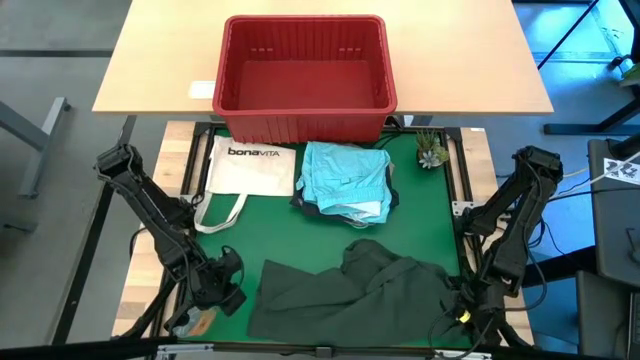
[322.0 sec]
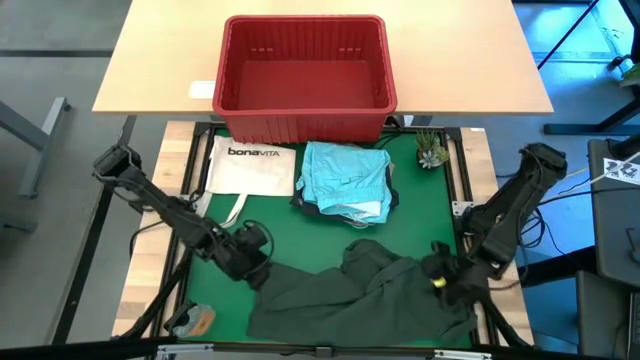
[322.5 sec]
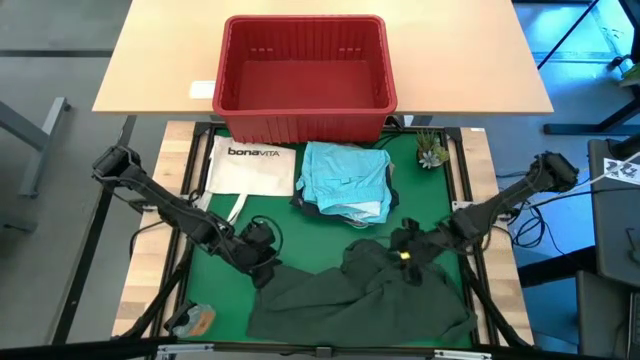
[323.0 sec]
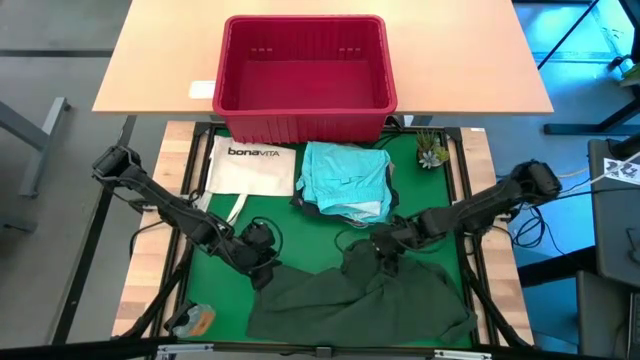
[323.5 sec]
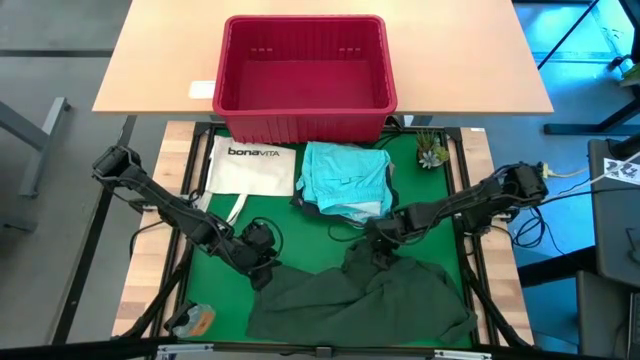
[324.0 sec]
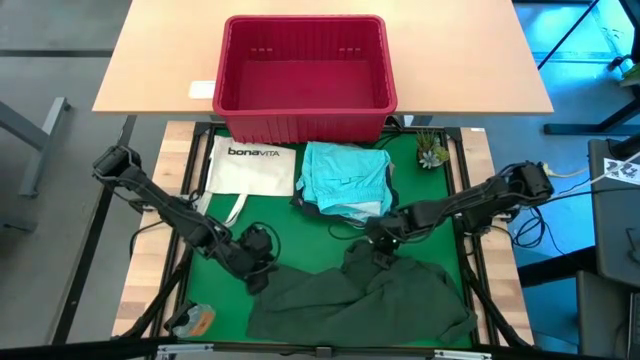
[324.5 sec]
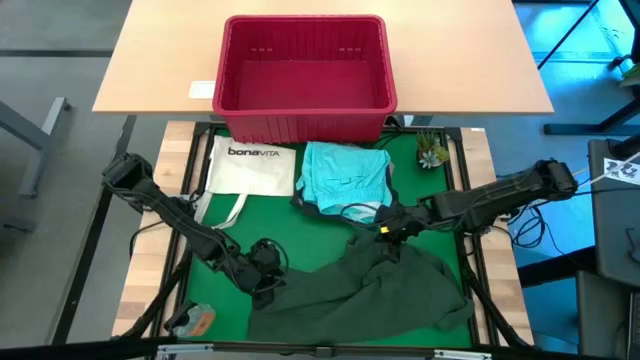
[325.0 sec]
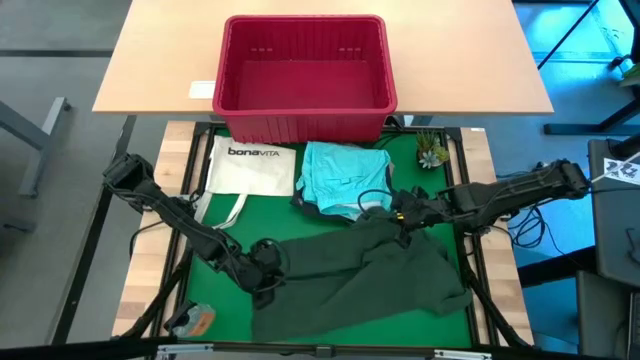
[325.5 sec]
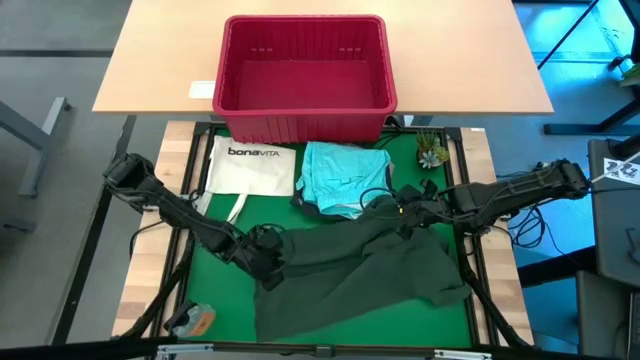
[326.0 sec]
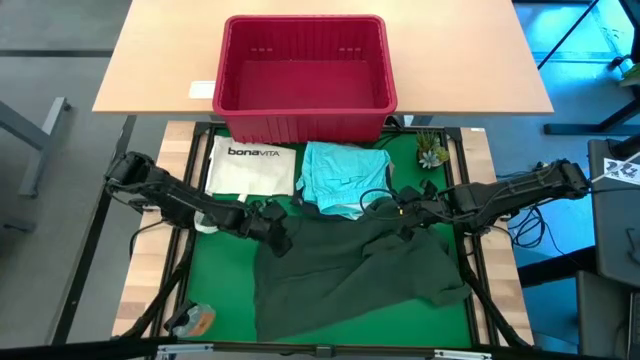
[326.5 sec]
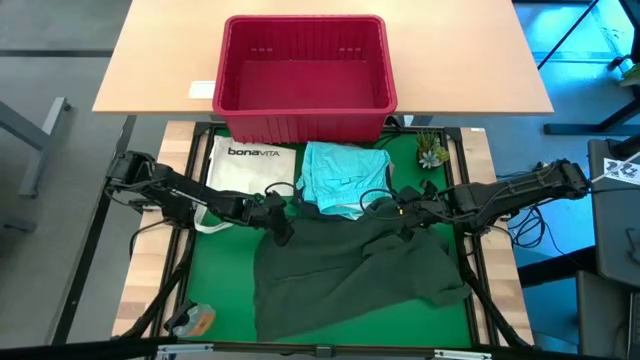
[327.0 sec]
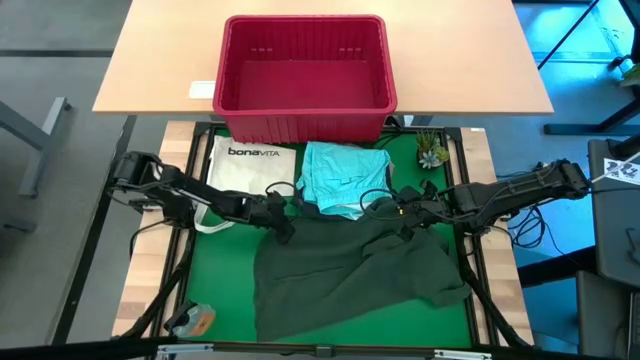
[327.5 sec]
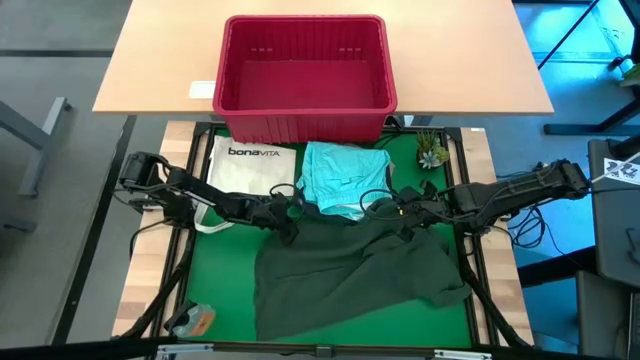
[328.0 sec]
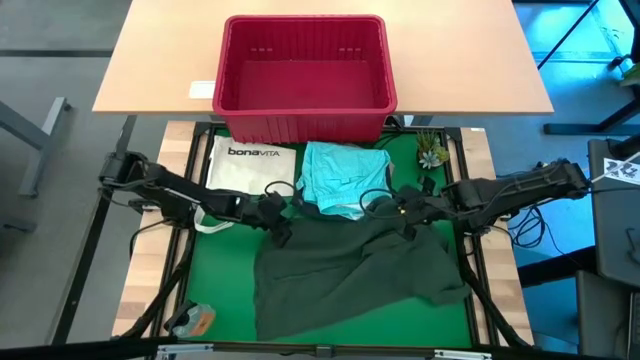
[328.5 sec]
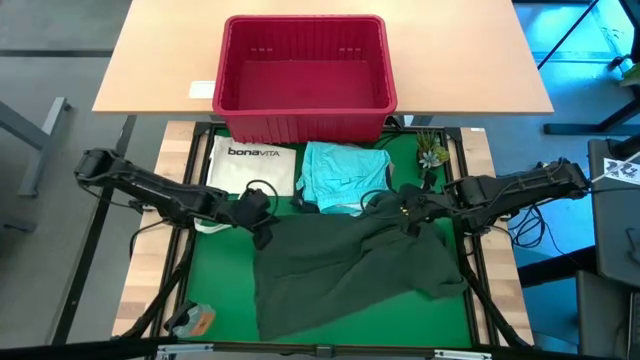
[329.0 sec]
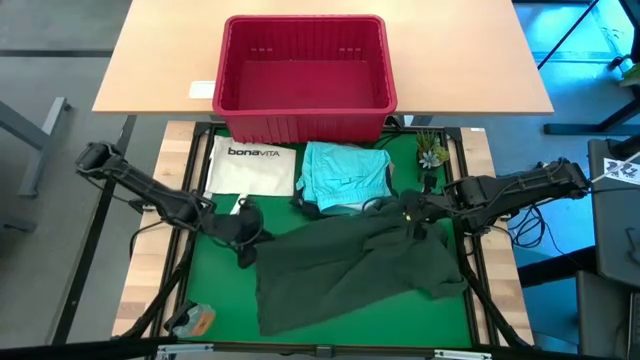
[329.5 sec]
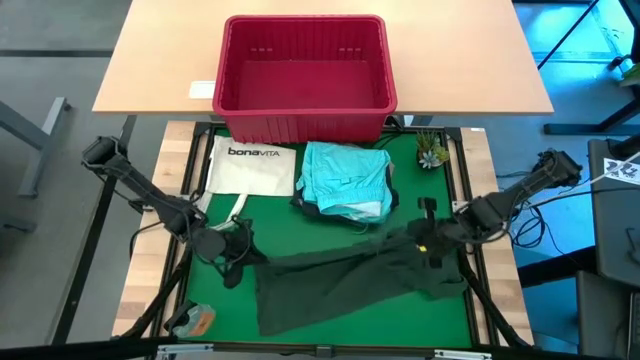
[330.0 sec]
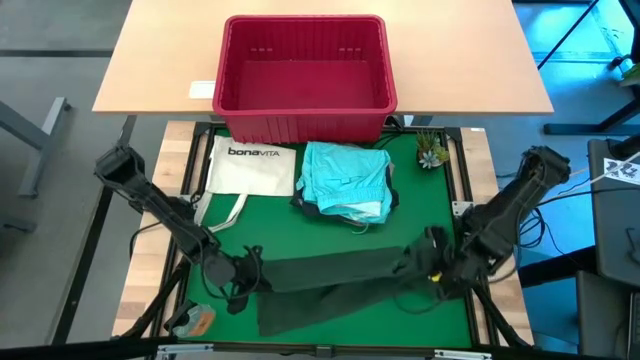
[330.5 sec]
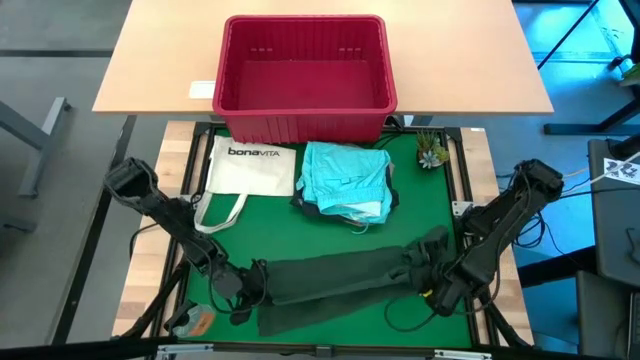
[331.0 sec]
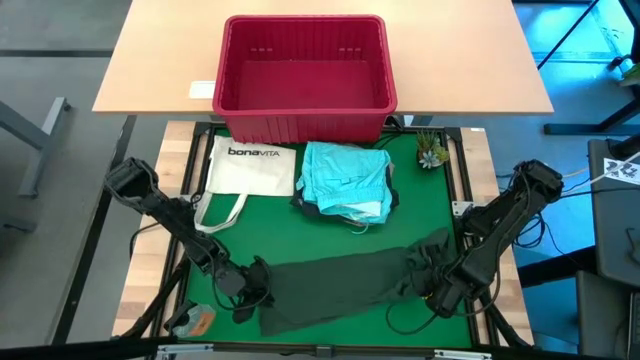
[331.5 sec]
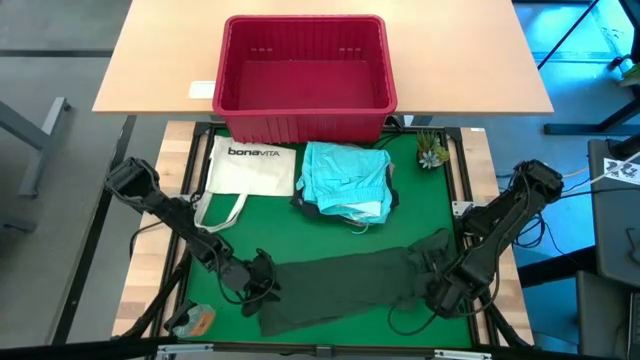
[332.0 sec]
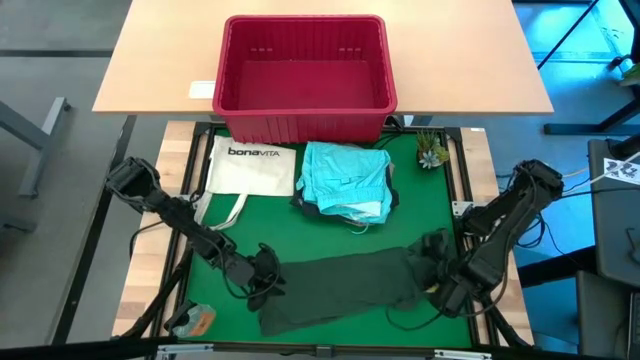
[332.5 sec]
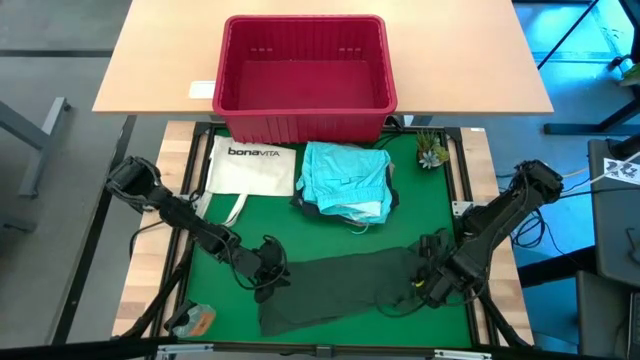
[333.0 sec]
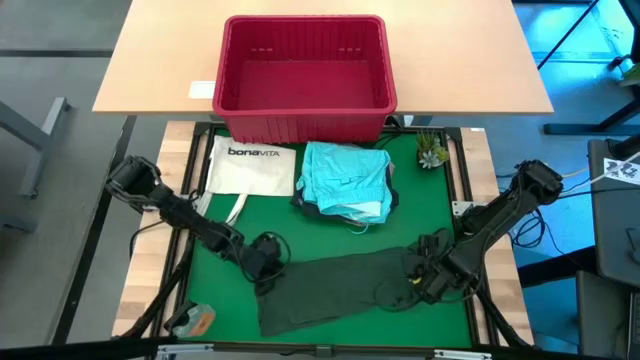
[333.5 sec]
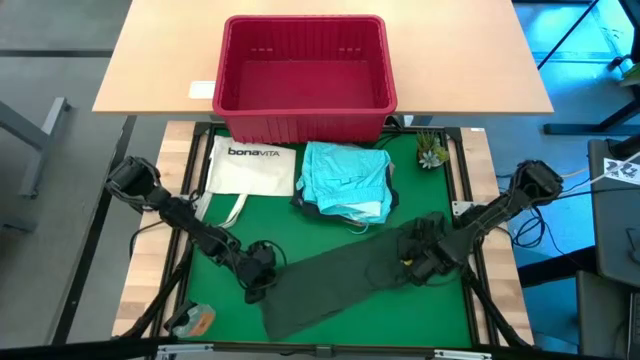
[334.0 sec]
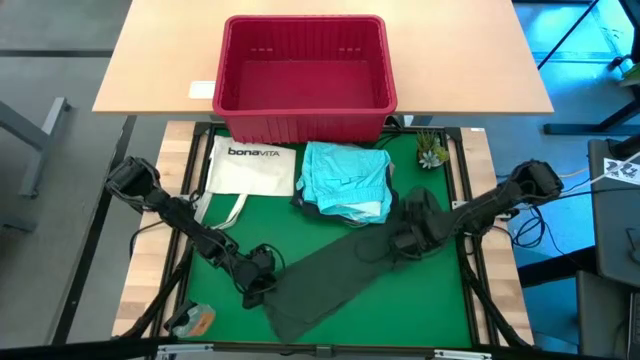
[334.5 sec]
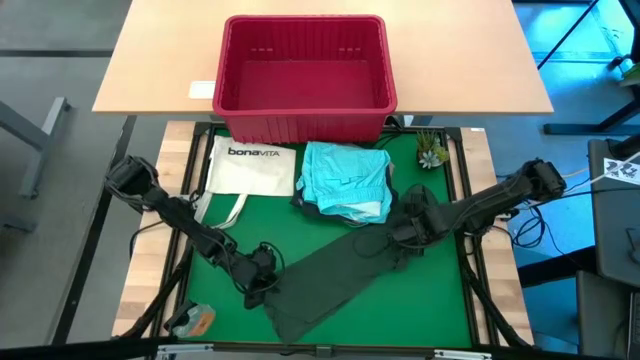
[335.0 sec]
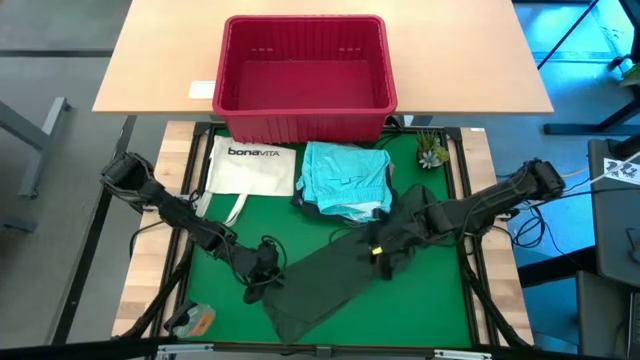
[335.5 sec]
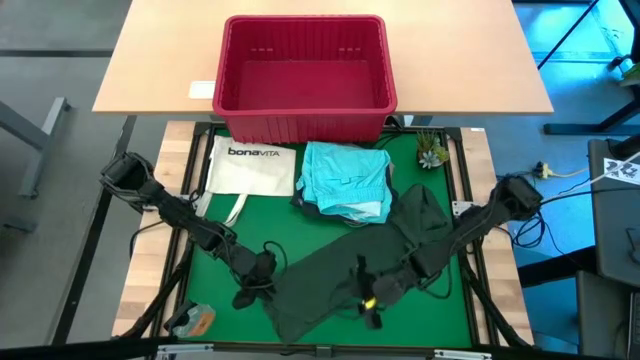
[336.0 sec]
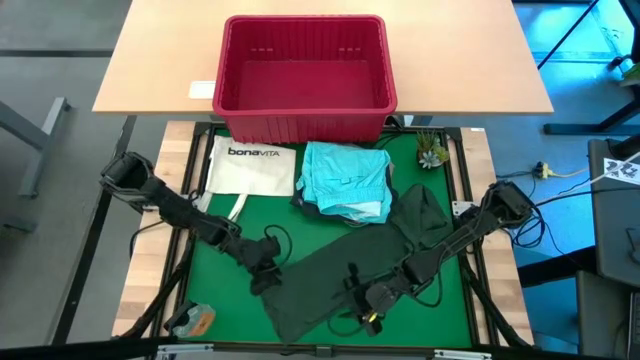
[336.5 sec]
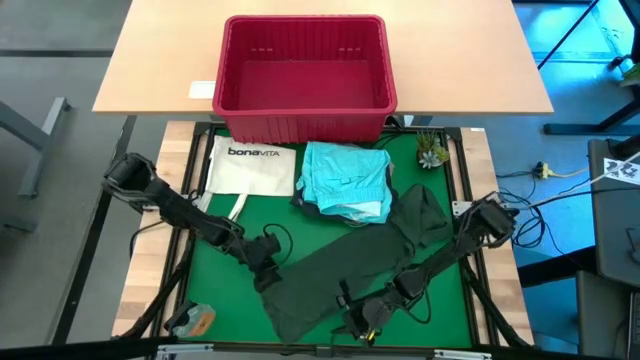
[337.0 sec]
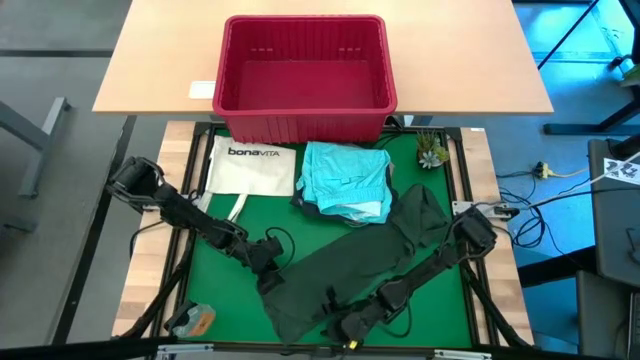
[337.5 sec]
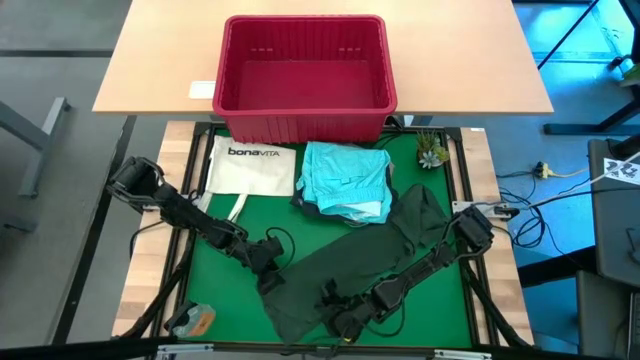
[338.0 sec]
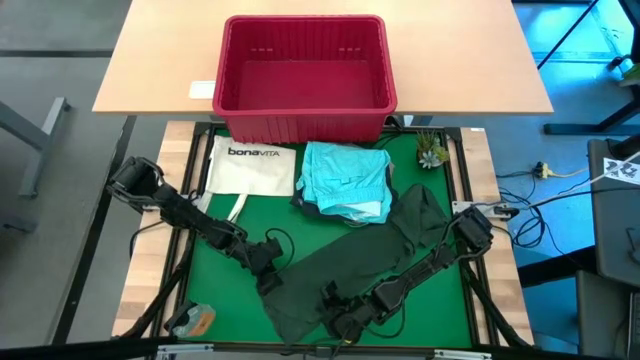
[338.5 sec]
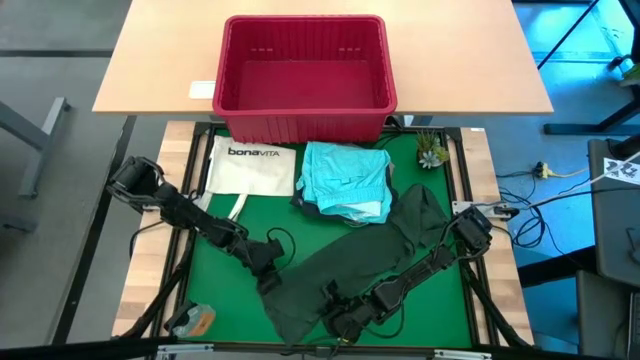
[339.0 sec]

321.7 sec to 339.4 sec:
Task: Fold Laundry from Bin
Fold the green polo shirt from the red laundry bin

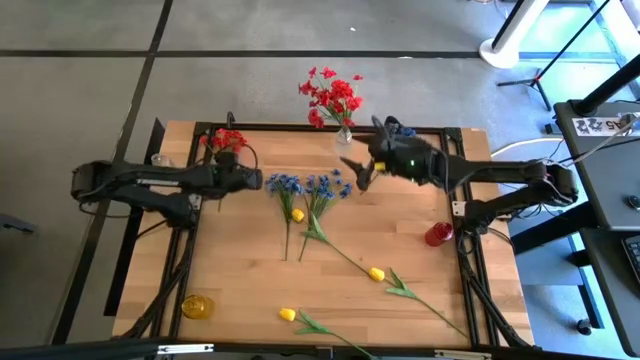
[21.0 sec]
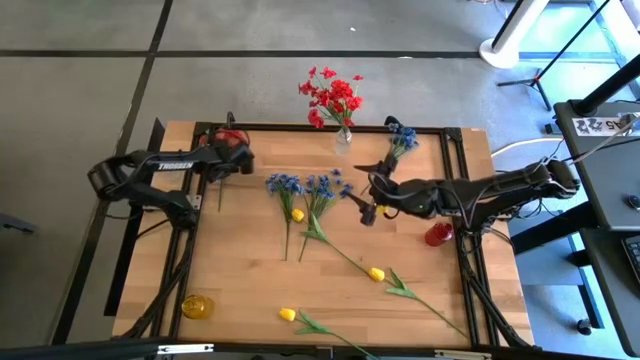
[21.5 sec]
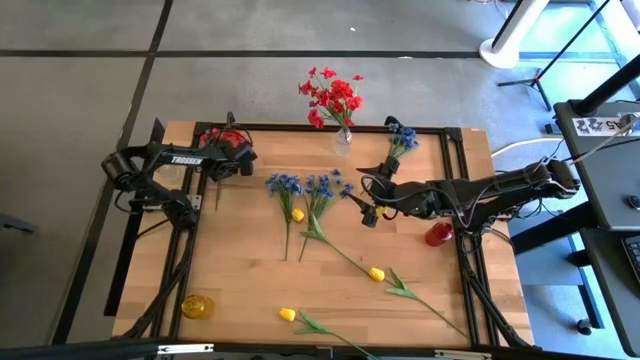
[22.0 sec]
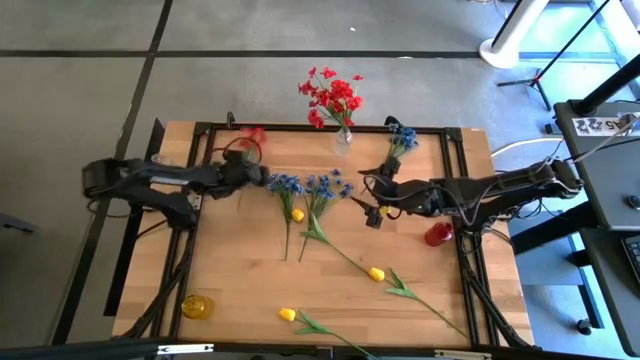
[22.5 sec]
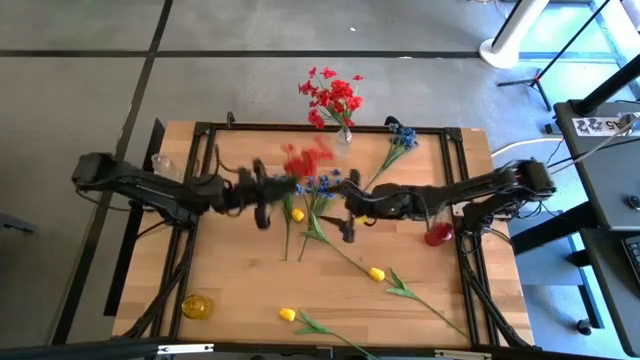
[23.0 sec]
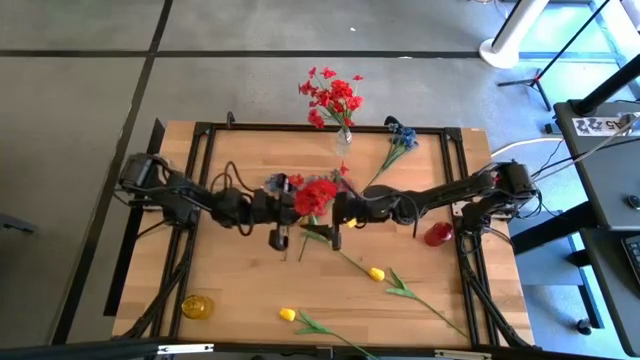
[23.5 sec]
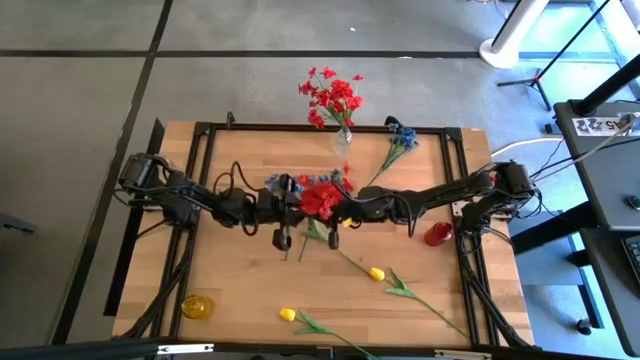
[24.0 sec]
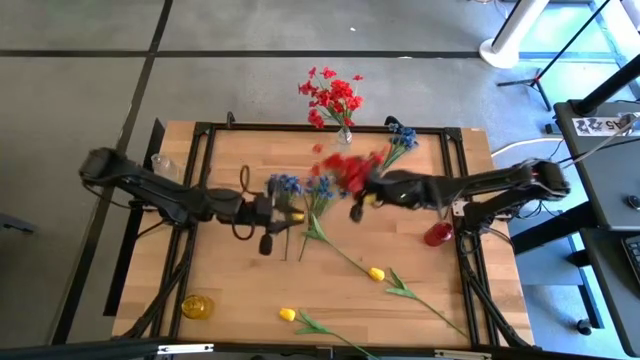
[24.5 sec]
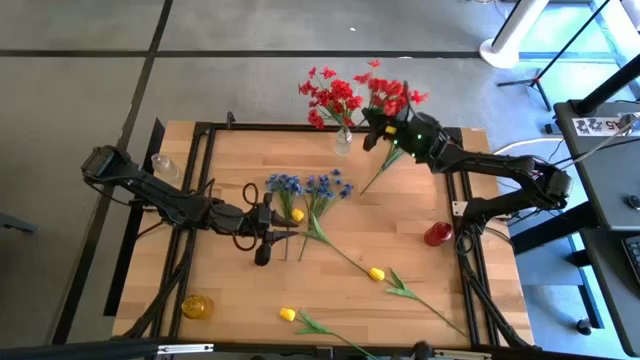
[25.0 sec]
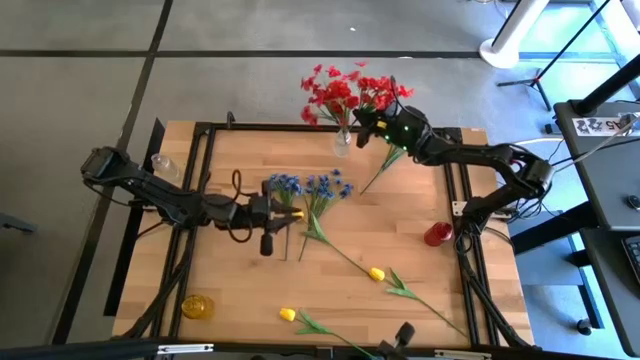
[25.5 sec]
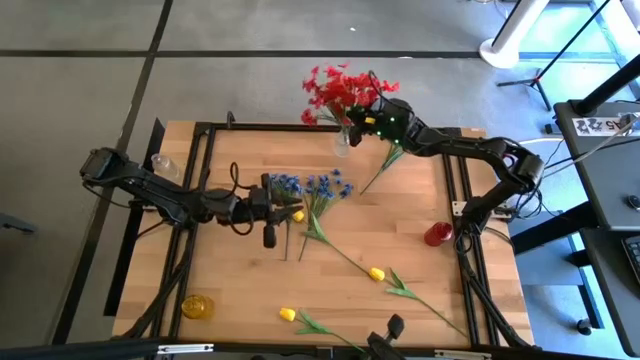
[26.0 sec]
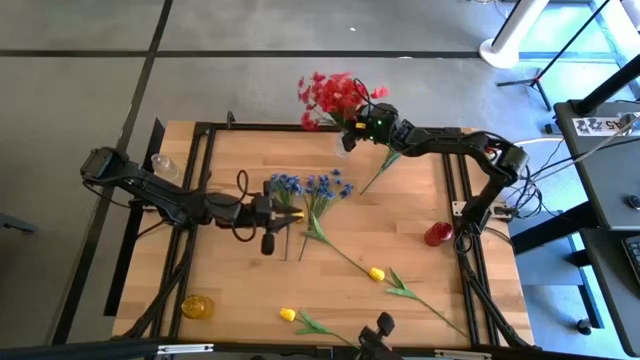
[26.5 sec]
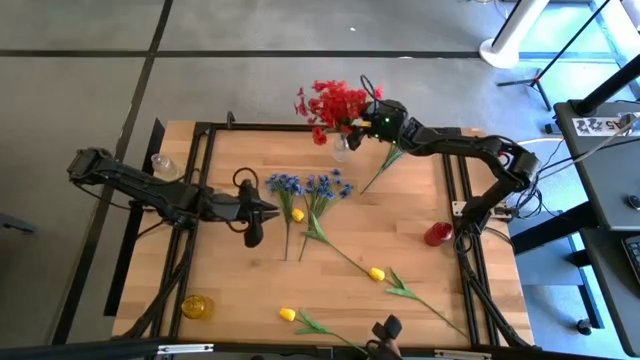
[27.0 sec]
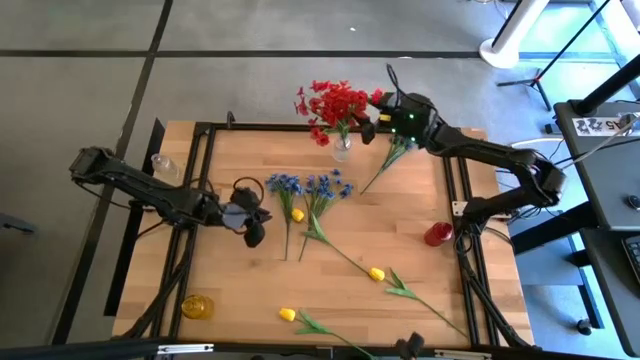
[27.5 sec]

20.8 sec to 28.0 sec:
Task: Sort flowers into vase by color
Put the red flower into the transparent vase
